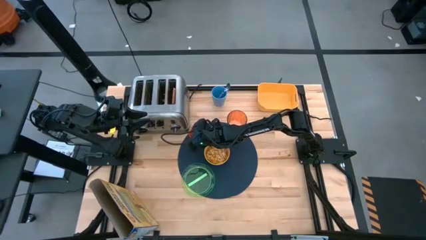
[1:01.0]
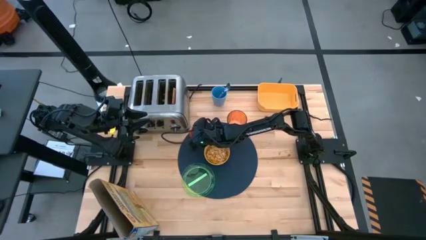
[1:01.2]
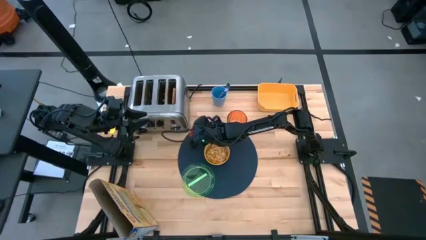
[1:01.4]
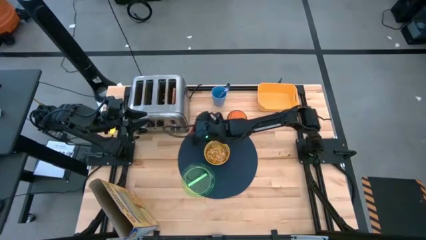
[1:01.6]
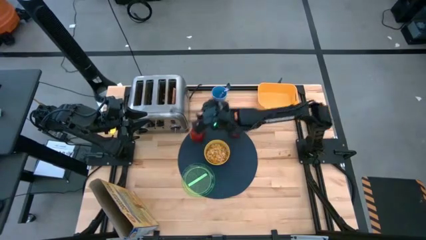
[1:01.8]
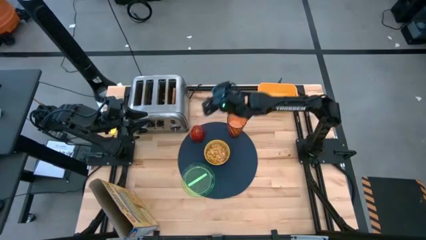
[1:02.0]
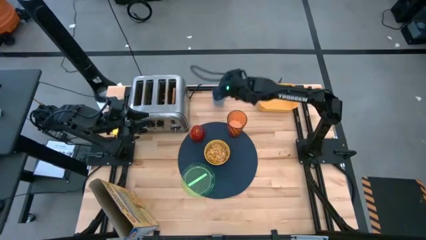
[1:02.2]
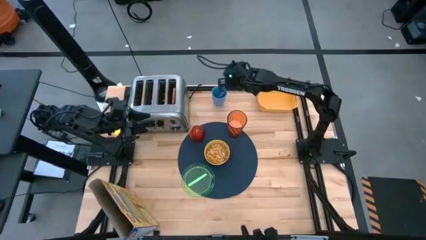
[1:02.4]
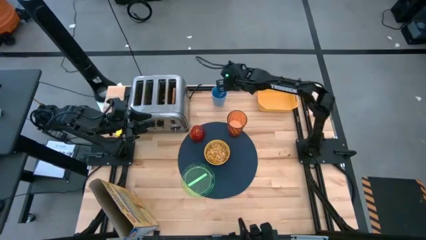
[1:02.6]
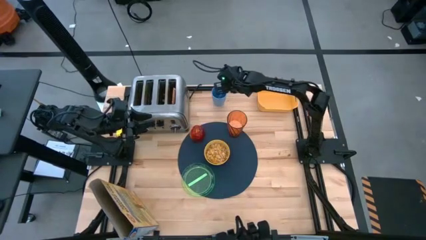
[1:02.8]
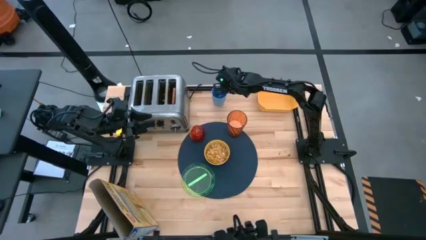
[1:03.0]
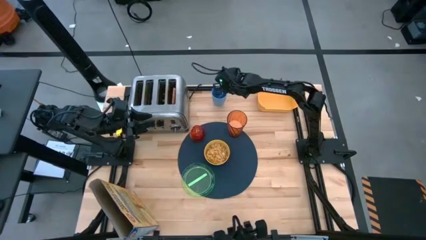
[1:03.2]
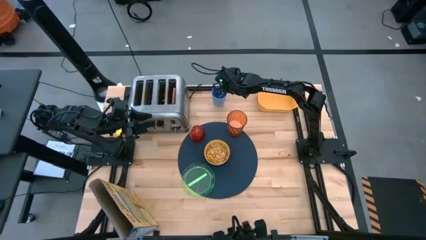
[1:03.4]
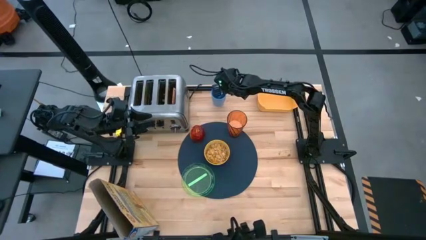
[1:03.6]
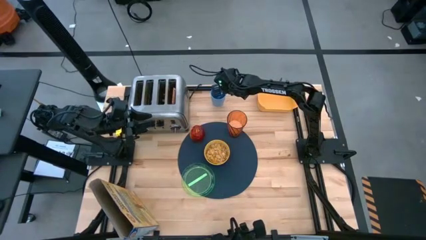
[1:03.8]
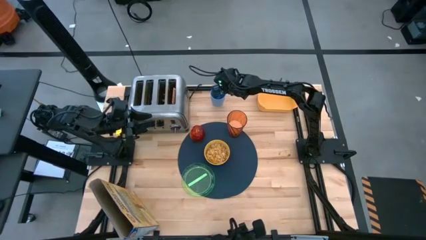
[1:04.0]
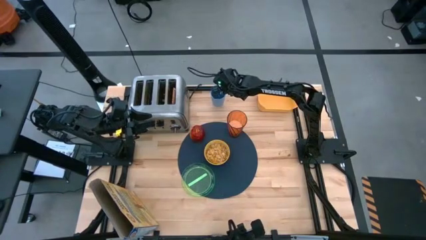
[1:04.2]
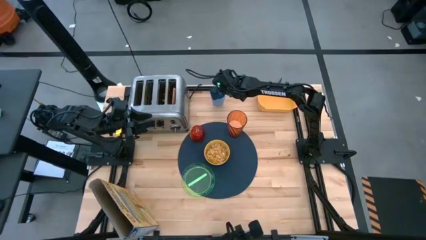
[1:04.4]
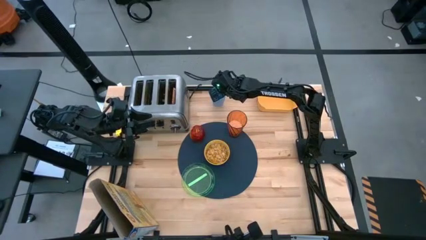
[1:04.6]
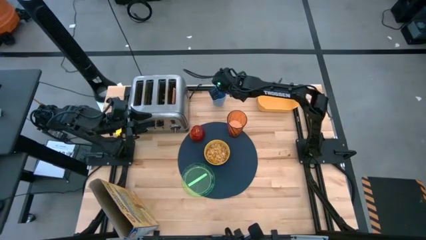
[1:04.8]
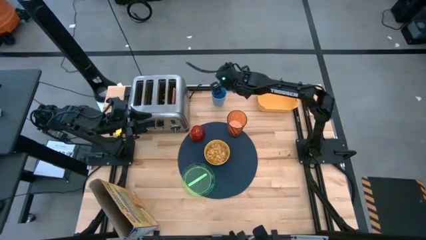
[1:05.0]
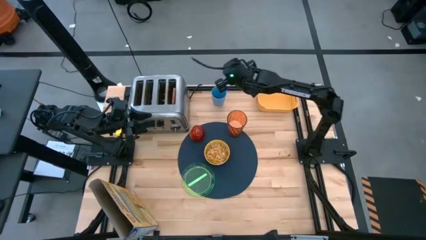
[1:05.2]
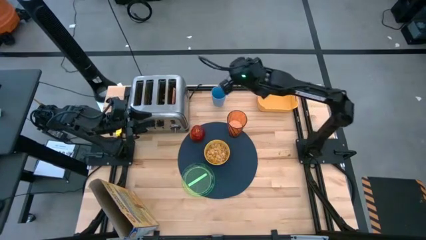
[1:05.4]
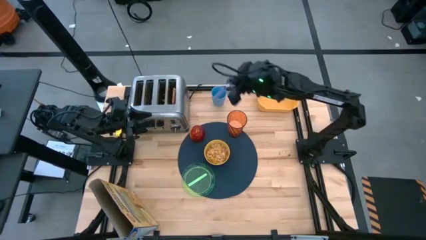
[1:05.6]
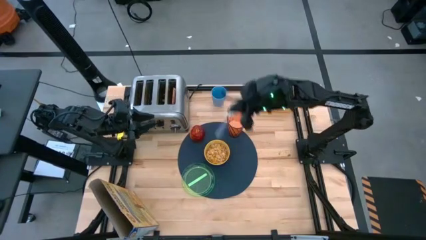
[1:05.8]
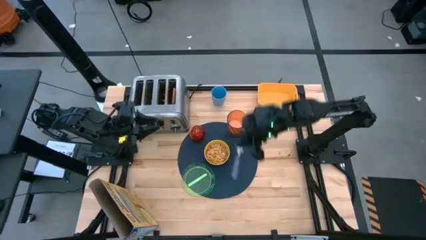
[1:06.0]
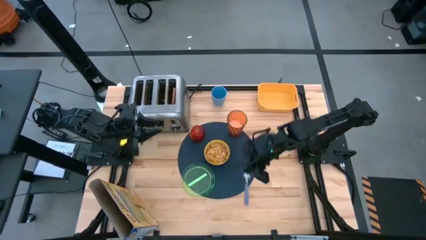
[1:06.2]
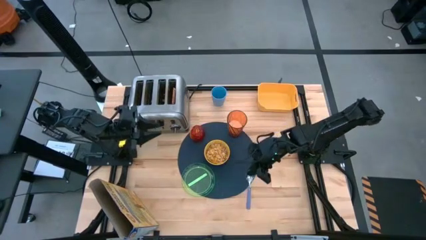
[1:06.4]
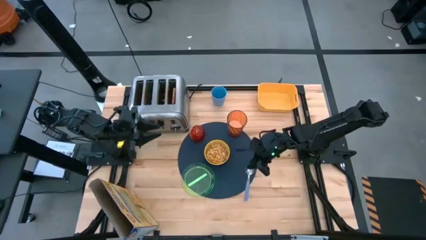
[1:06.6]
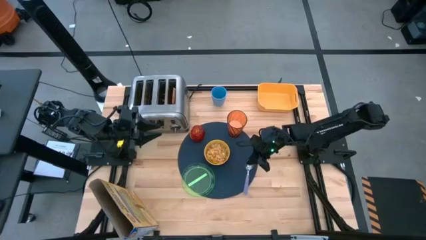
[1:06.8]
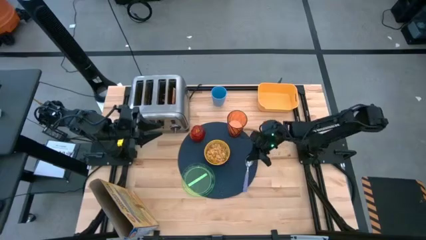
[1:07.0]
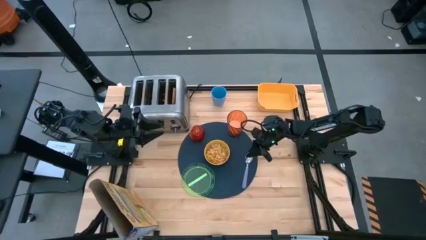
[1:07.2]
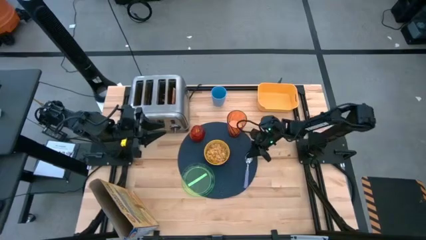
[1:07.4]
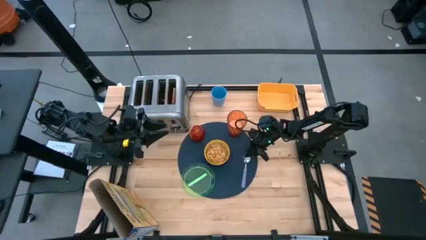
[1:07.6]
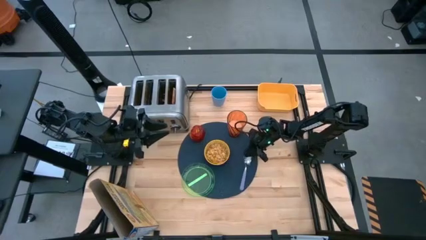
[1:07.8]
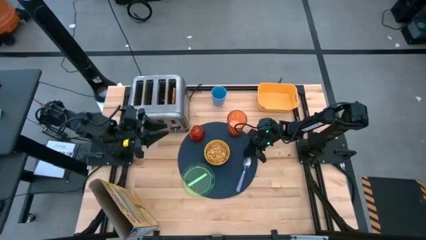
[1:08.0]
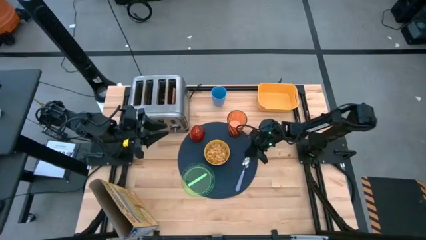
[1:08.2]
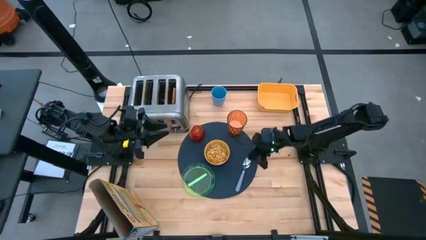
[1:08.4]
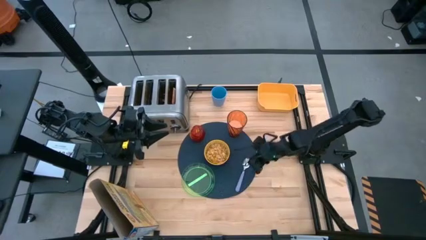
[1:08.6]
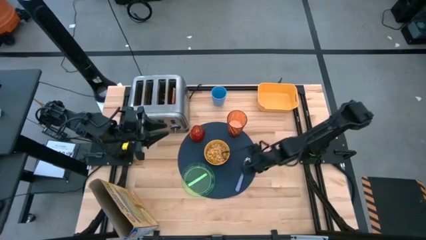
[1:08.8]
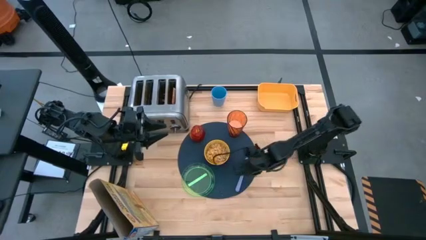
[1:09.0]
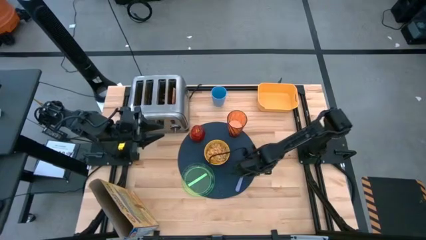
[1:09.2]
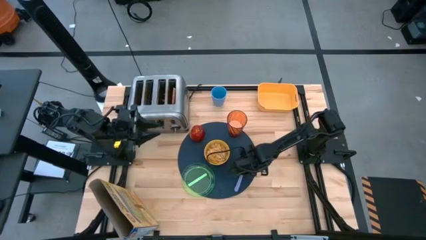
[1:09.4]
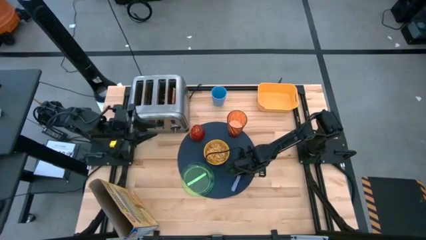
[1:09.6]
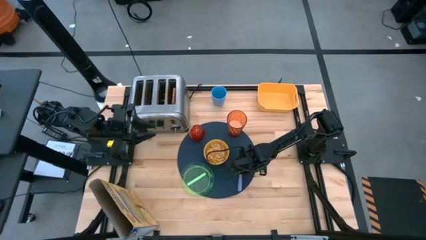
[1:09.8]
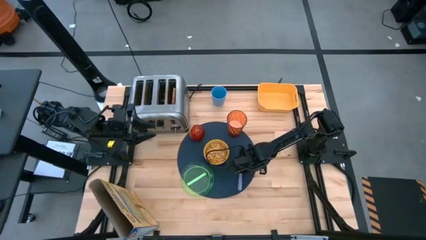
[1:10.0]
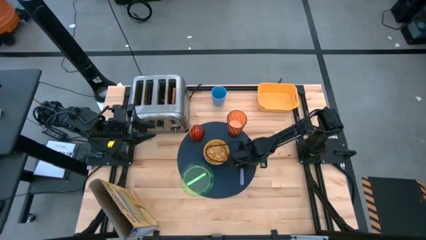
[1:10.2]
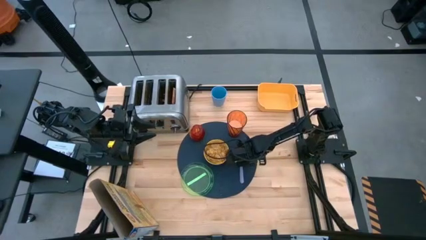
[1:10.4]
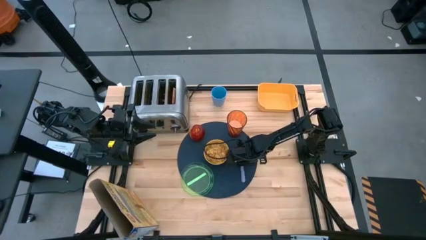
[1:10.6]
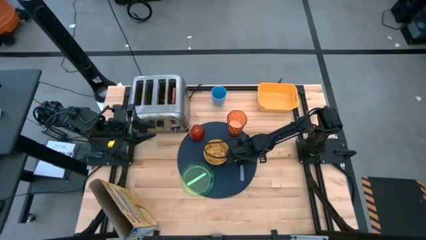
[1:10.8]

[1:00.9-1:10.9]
Task: Arrange a breakfast setting
Put the violet spoon from the cup to the right side of the yellow bowl on the placemat

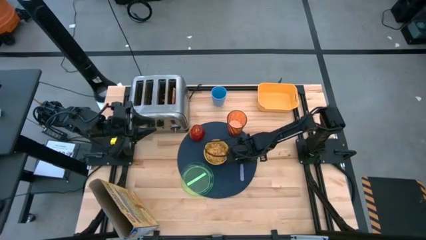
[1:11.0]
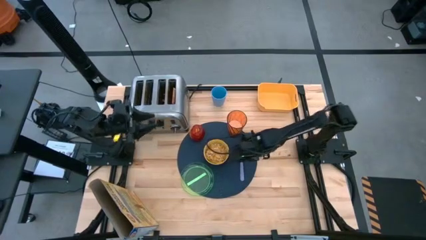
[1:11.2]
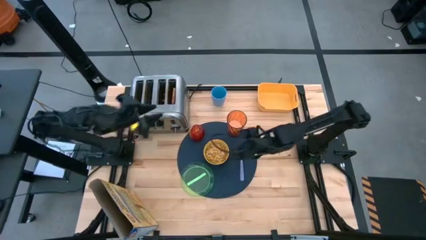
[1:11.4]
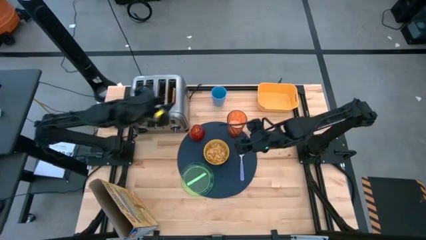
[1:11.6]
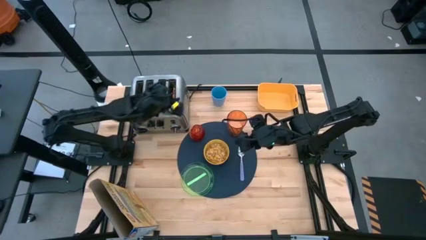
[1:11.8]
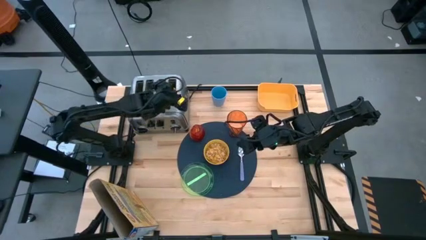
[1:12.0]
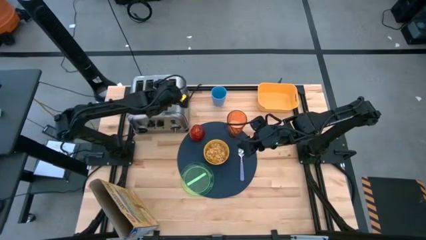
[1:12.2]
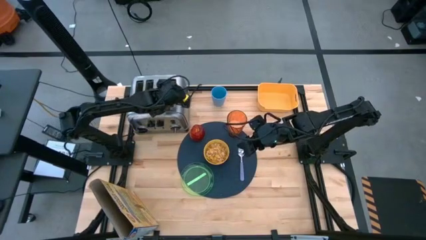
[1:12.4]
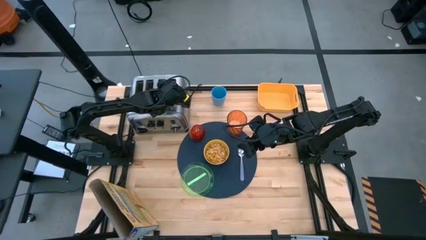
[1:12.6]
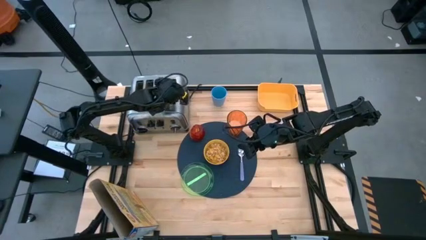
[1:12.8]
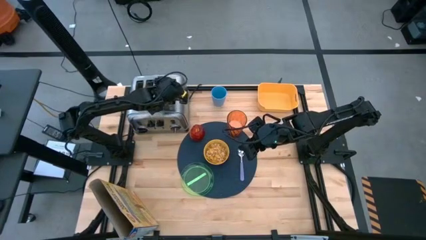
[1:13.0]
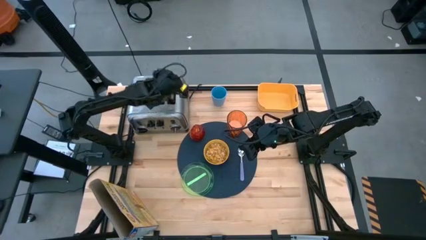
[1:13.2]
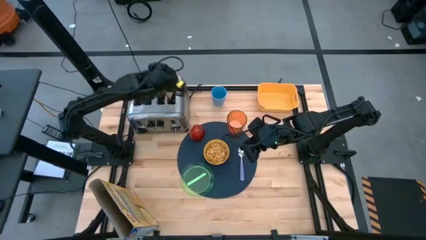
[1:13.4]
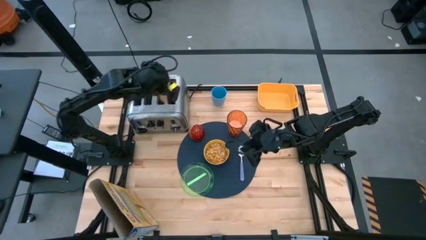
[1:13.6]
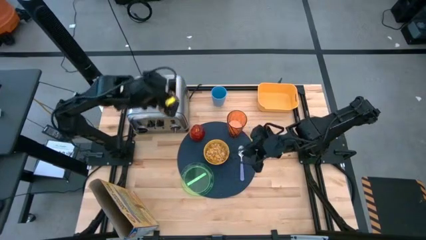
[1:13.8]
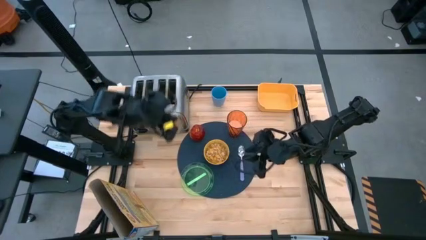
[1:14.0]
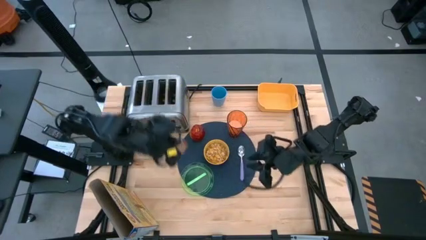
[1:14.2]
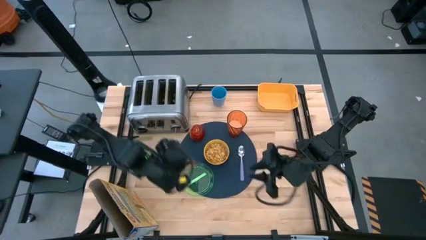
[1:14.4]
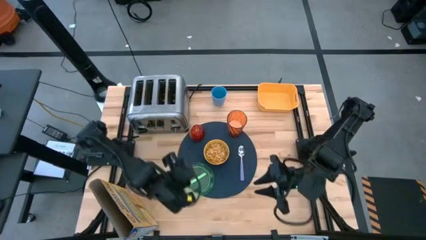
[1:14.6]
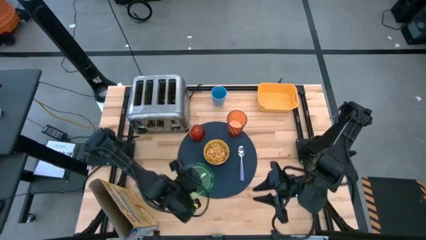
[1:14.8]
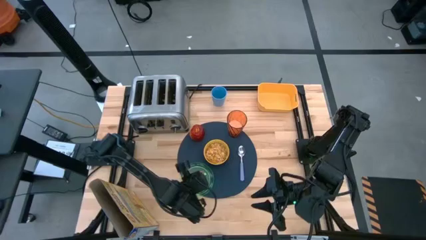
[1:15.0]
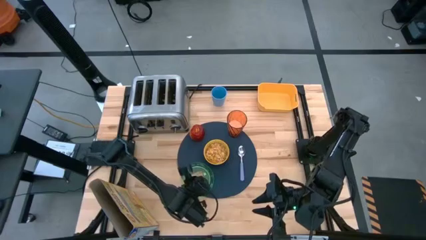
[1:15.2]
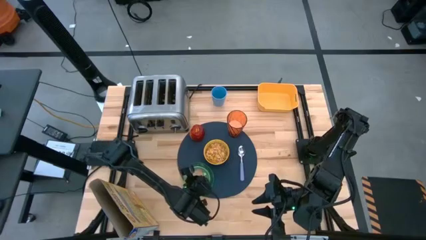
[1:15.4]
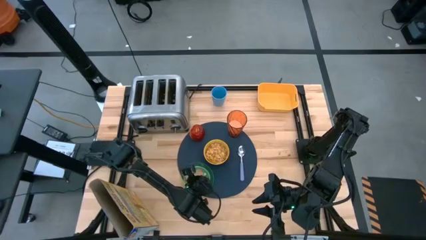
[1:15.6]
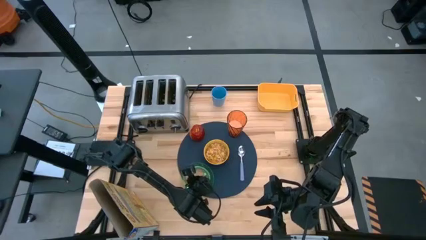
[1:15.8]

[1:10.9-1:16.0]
Put the toasted bread from the toaster on top of the transparent green plate on the placemat

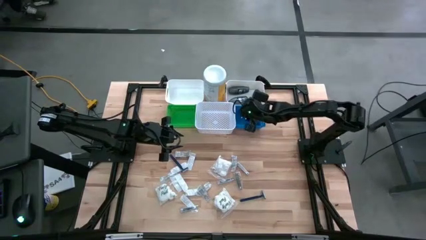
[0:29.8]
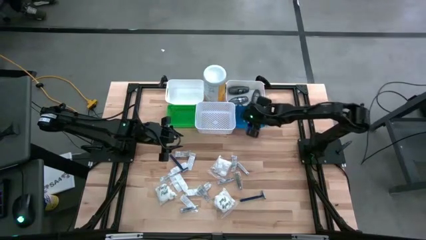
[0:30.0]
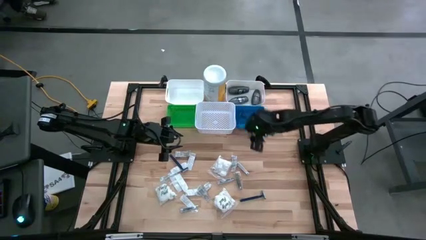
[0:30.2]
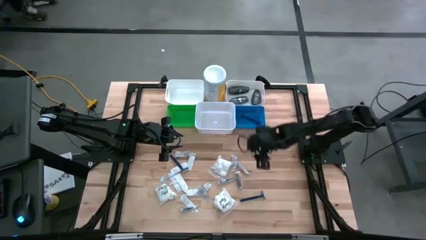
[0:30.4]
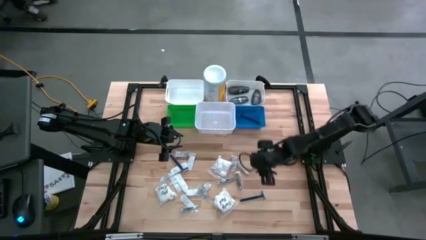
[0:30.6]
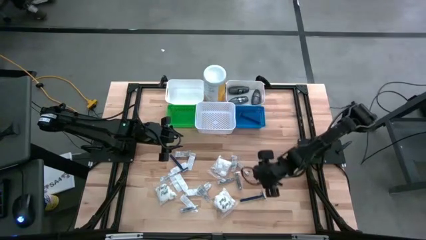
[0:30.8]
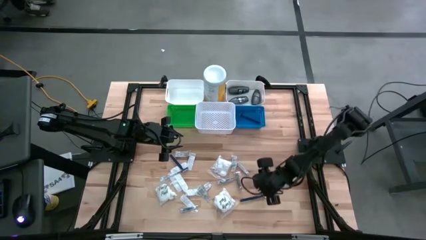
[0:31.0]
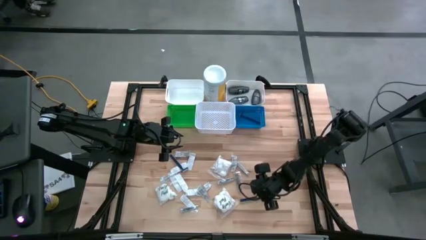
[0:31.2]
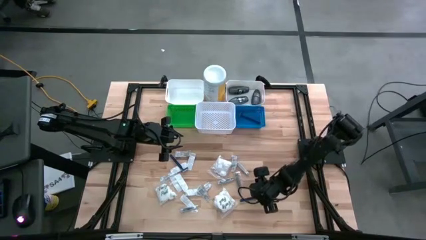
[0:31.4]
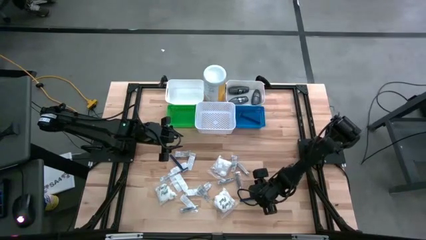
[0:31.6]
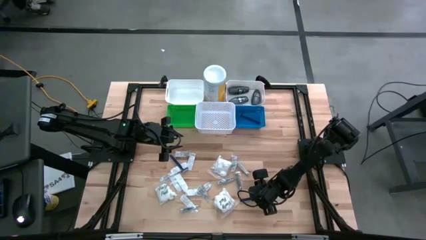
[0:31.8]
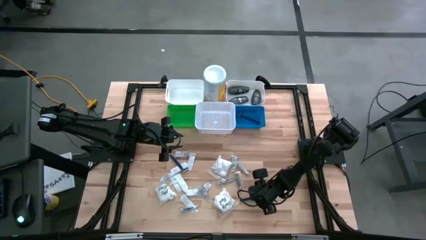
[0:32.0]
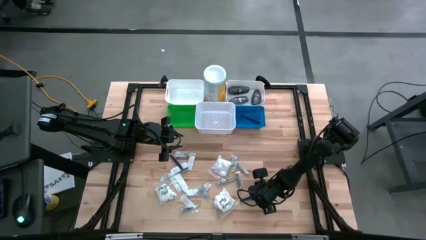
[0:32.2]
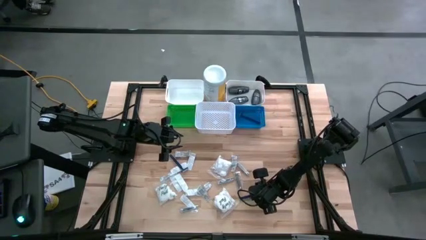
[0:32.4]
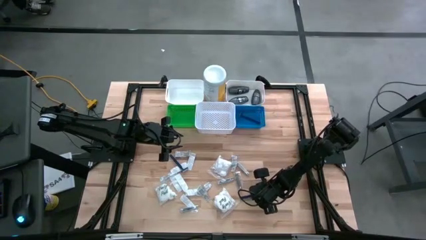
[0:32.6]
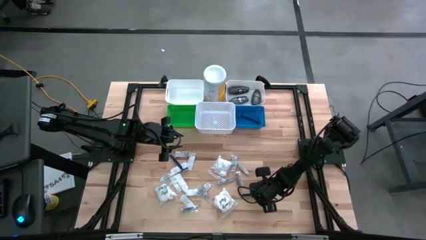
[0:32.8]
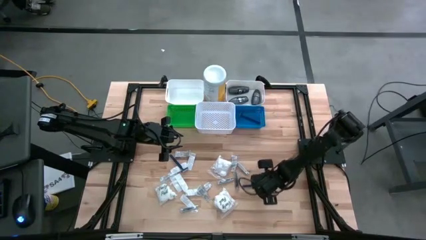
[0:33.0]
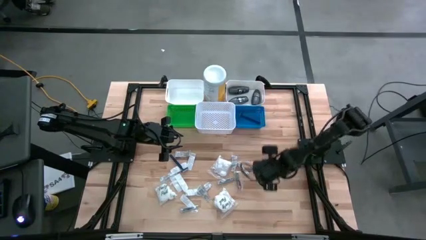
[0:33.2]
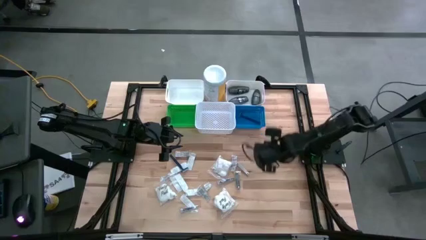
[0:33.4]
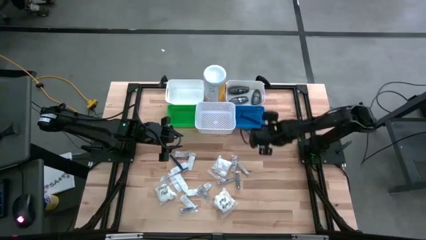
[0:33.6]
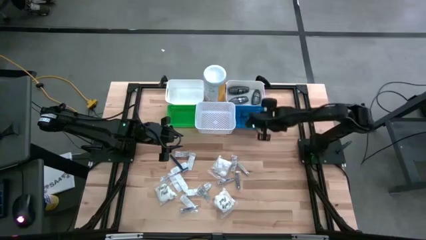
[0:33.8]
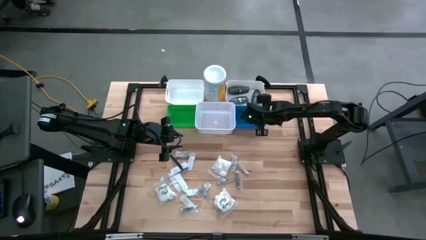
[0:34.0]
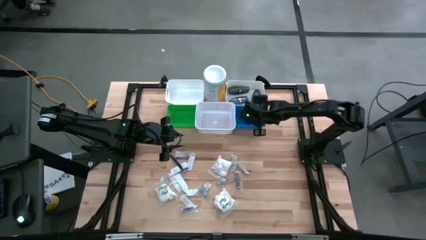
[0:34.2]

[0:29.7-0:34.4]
Task: Pick & Place Travel size toiletries
Put the blue razor into the blue bin
